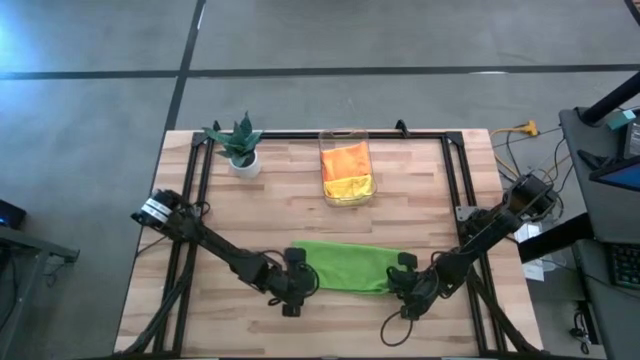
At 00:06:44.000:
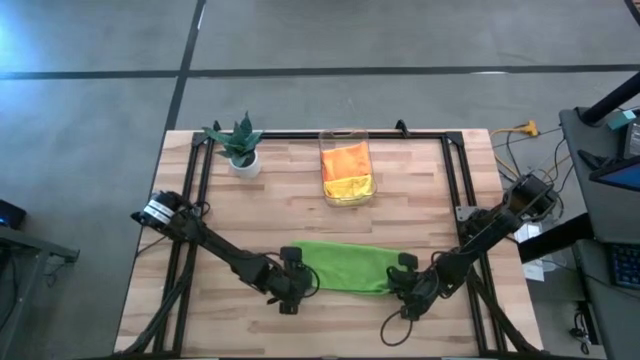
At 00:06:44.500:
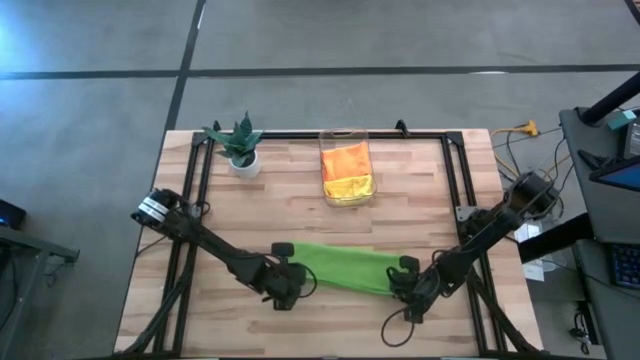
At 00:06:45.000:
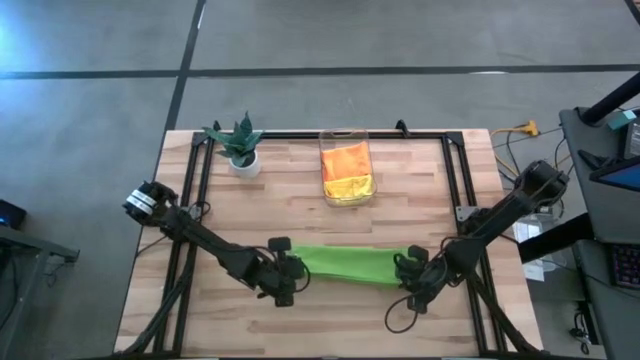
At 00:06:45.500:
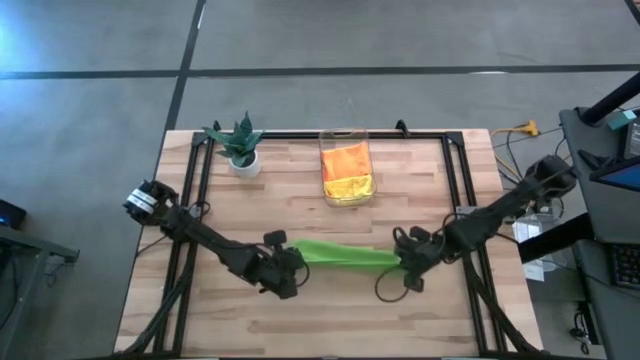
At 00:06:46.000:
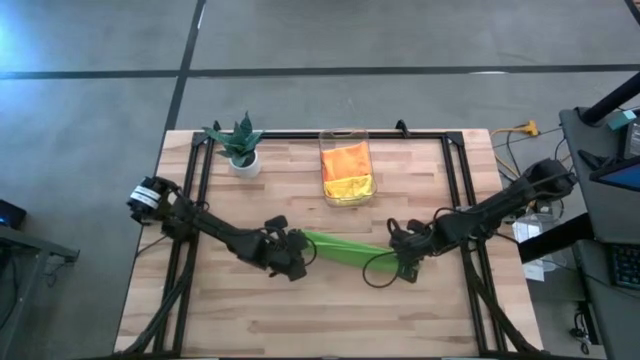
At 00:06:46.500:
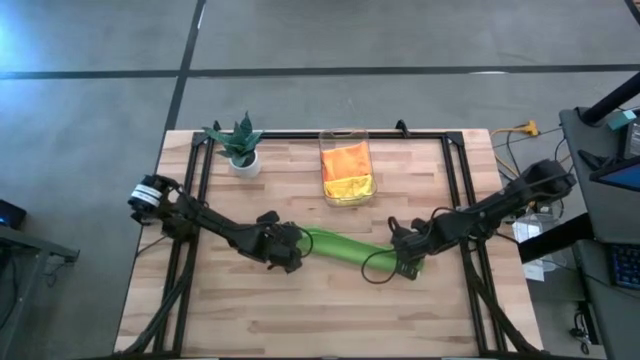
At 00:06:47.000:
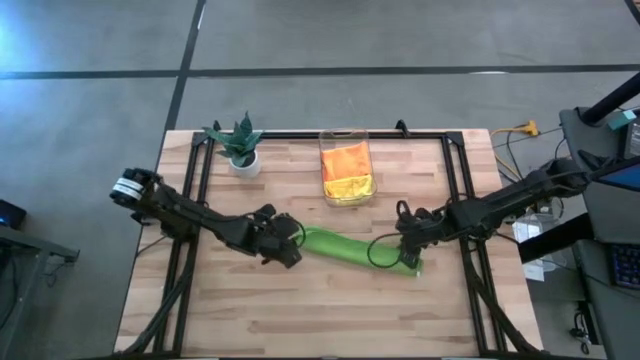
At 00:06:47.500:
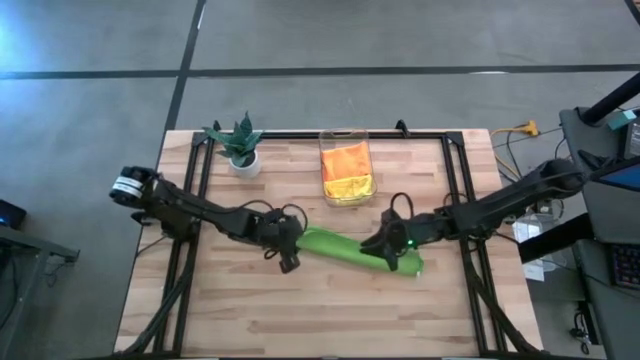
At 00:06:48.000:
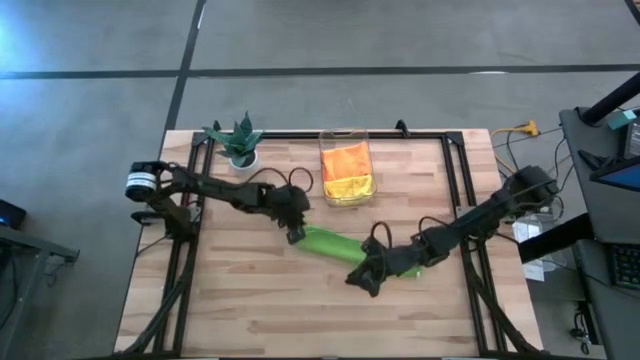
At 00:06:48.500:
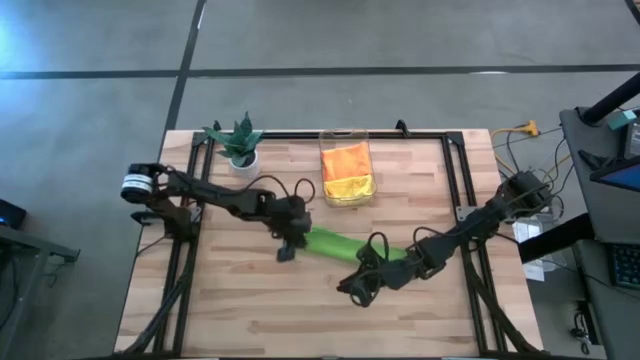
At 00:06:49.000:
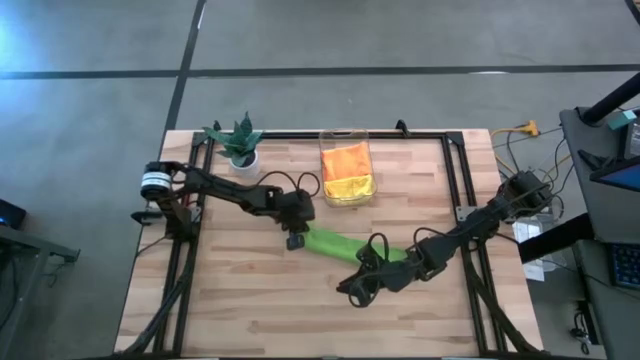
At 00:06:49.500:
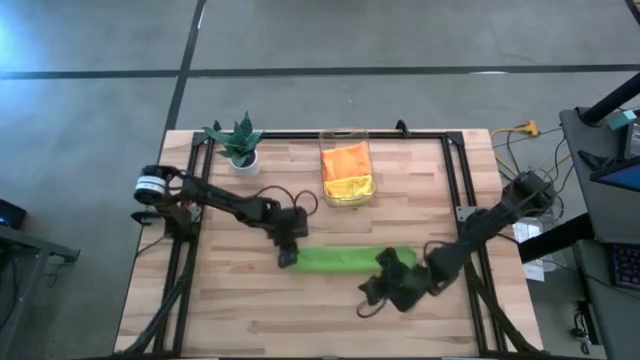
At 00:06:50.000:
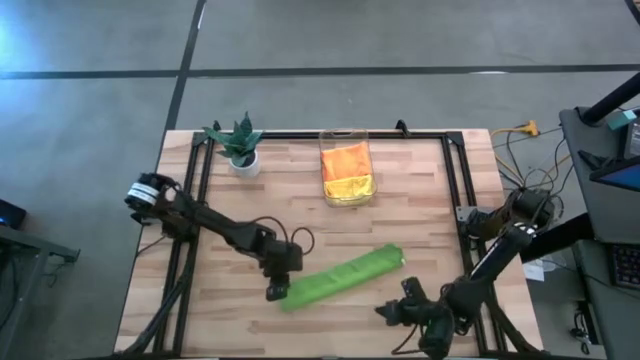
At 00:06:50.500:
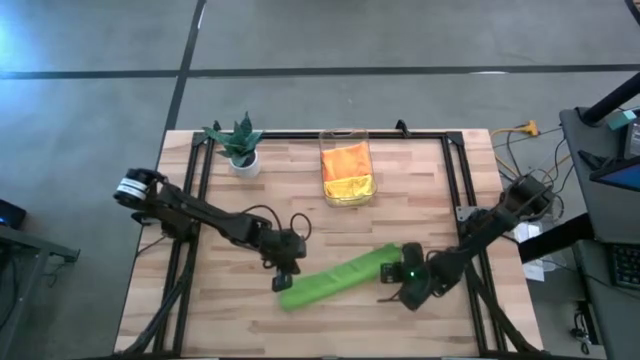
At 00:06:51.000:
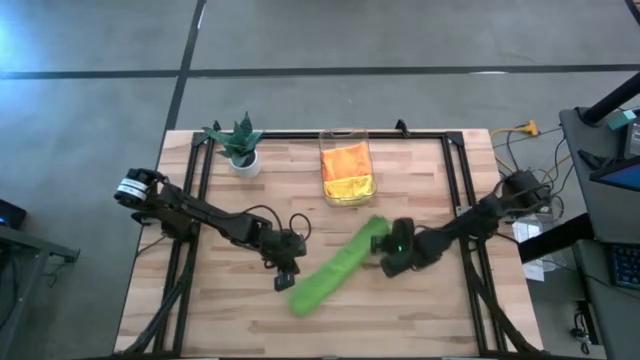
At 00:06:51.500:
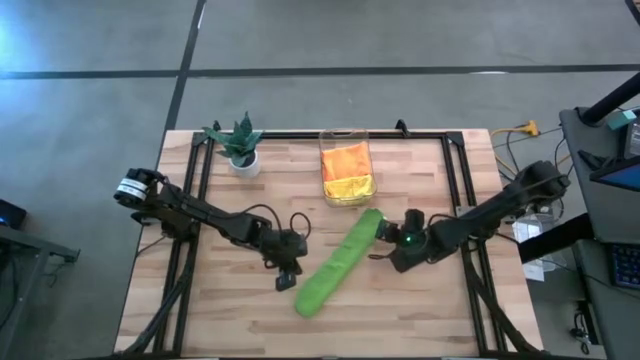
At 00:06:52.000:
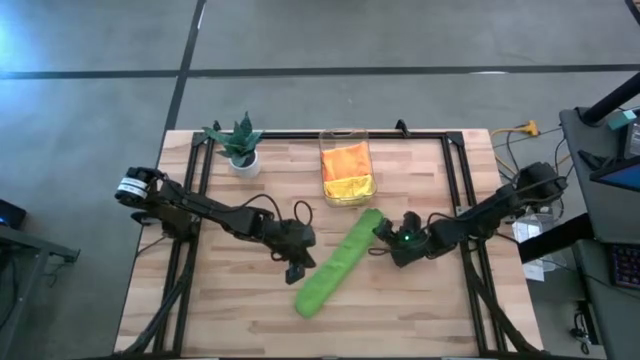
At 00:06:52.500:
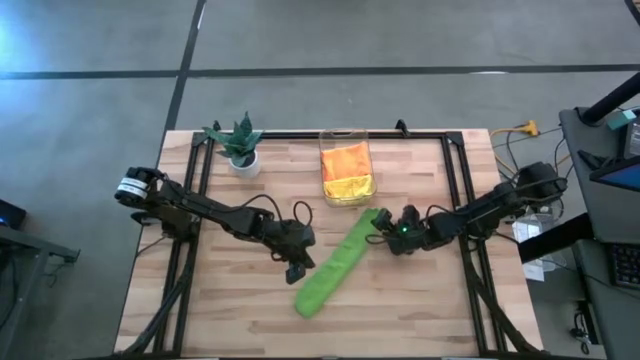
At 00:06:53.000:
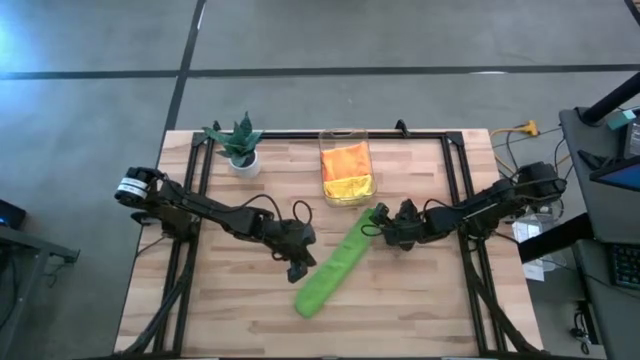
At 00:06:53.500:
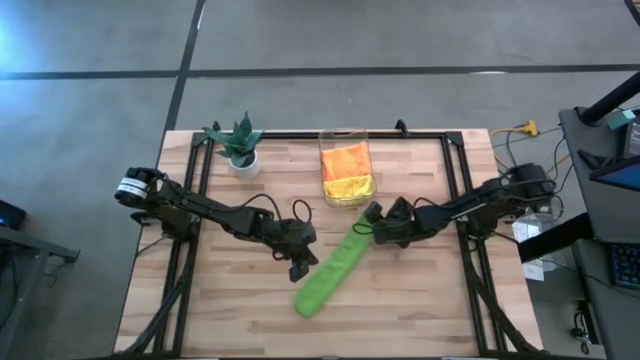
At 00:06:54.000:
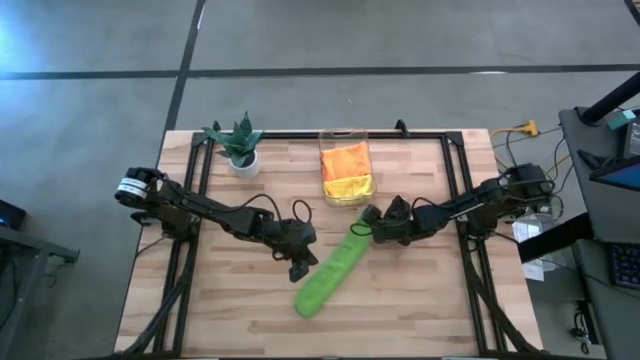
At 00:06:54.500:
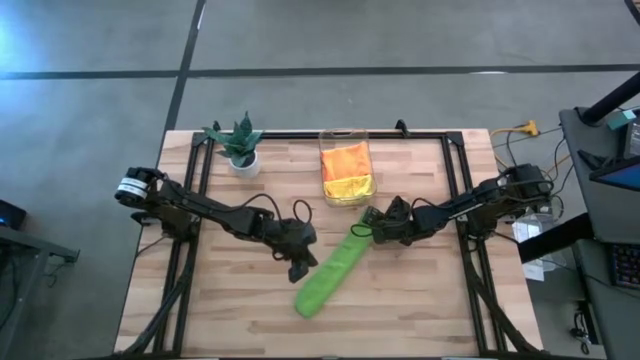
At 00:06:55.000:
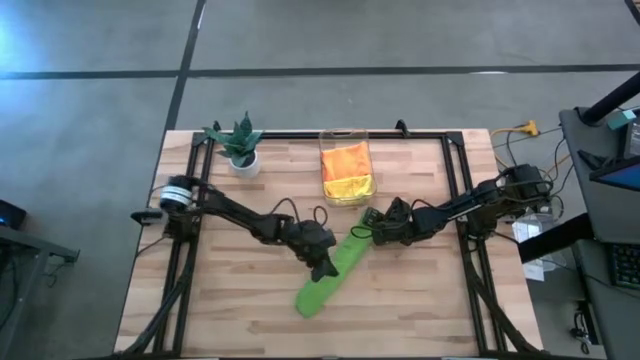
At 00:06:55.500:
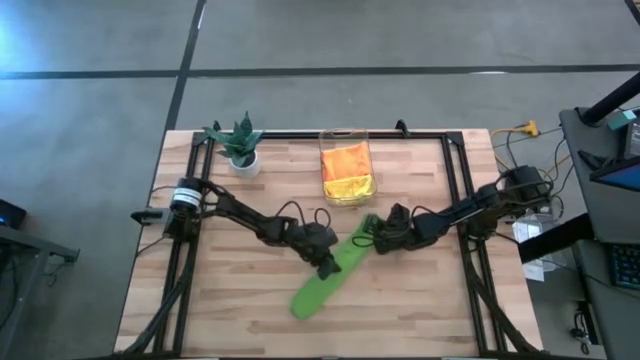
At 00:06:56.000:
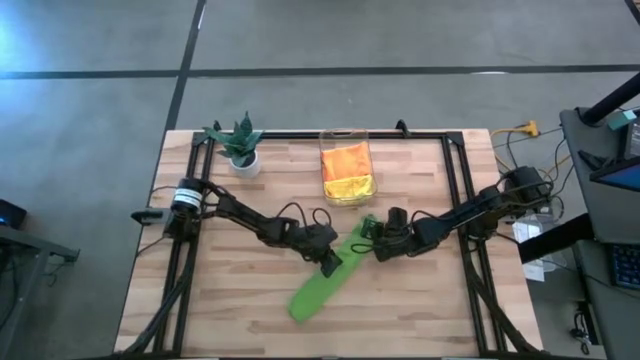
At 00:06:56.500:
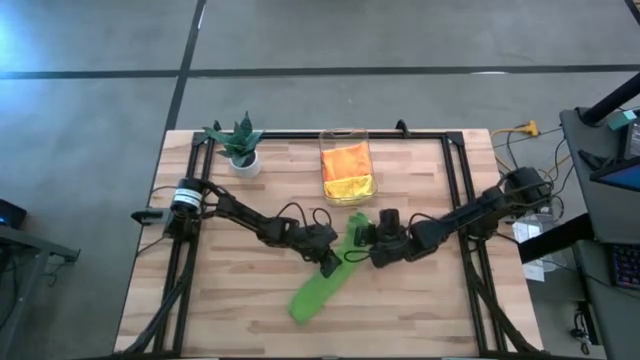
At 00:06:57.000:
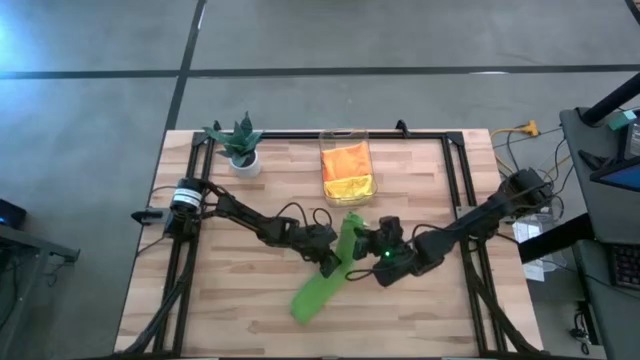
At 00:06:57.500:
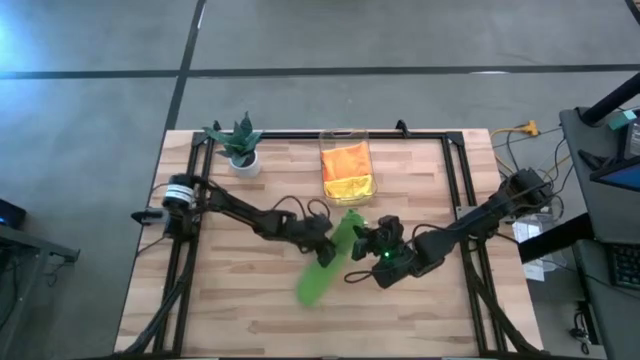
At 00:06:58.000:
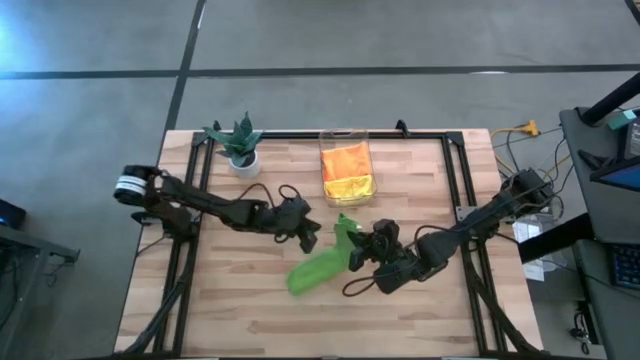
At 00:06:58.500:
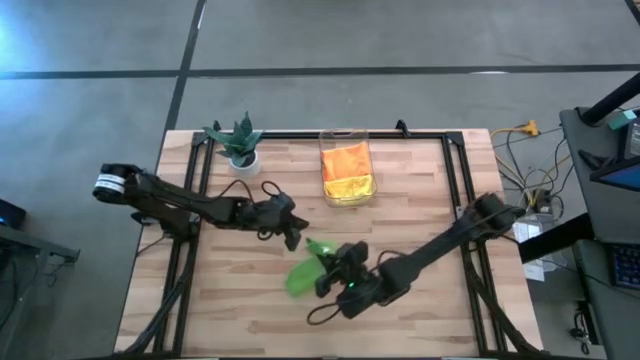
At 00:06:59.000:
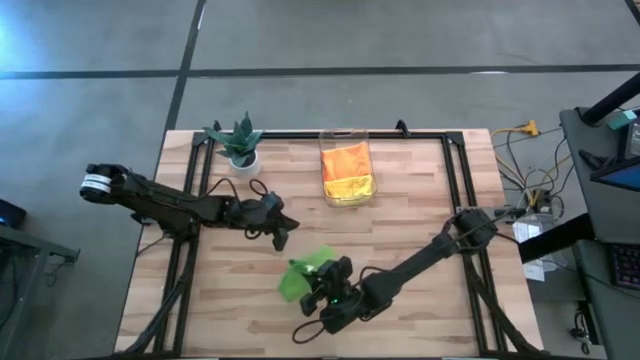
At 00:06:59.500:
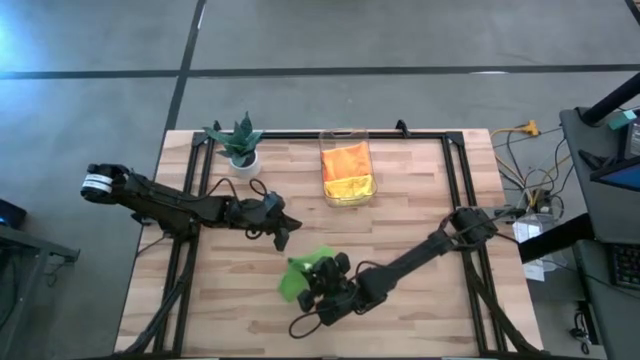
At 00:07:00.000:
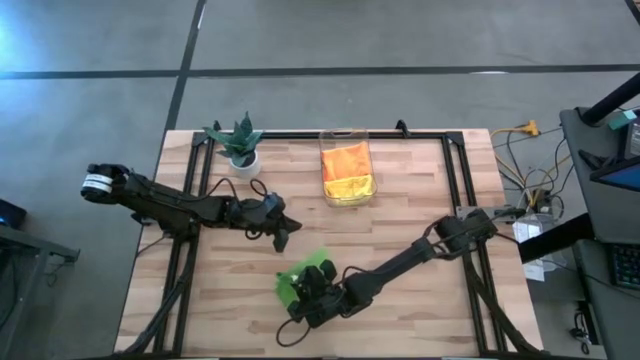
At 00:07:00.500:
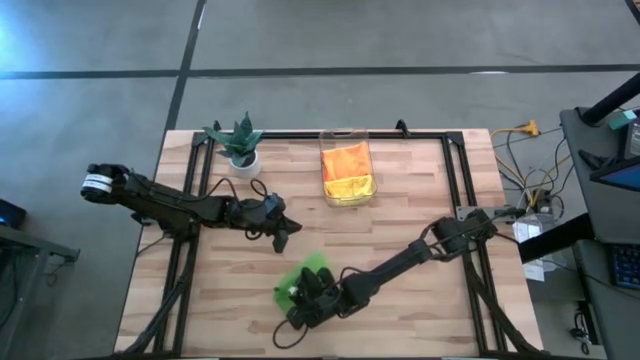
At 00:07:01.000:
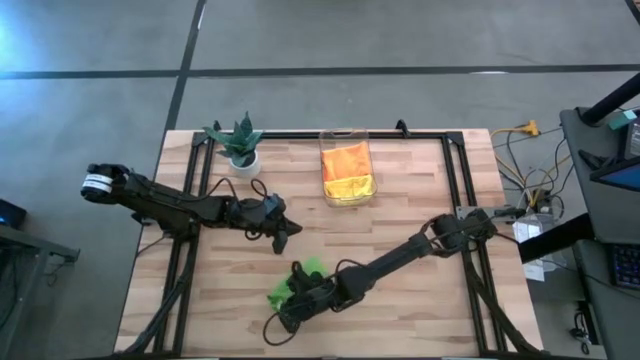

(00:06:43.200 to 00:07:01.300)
Task: Fold microfiber towels
Fold the green towel

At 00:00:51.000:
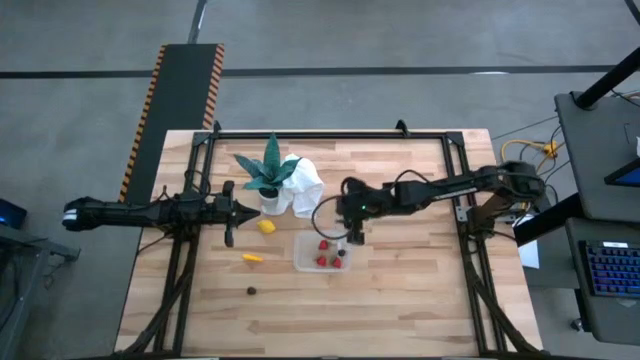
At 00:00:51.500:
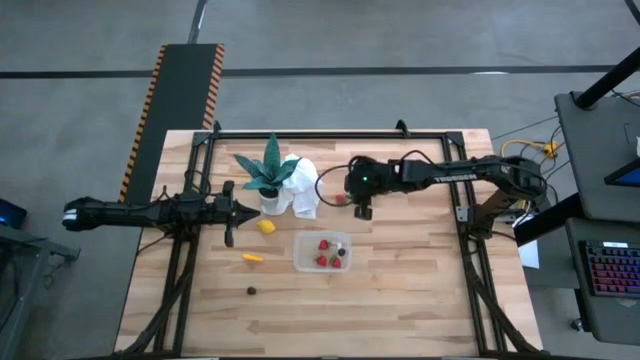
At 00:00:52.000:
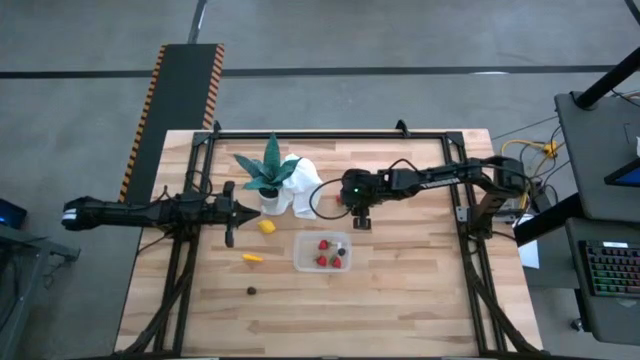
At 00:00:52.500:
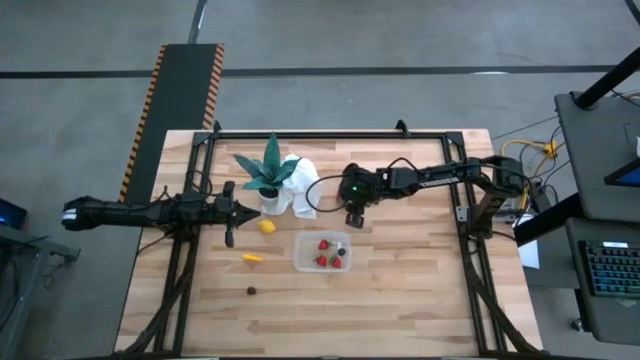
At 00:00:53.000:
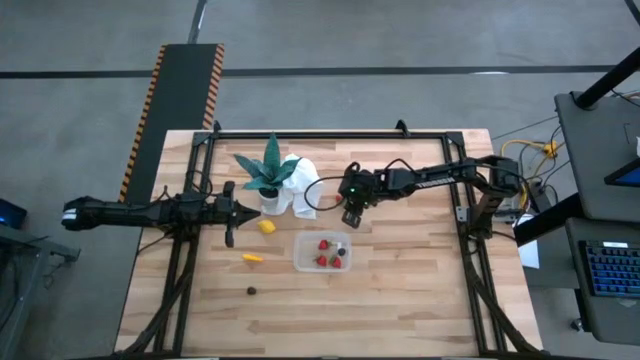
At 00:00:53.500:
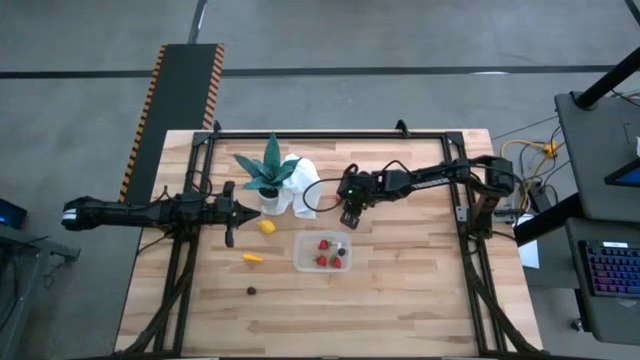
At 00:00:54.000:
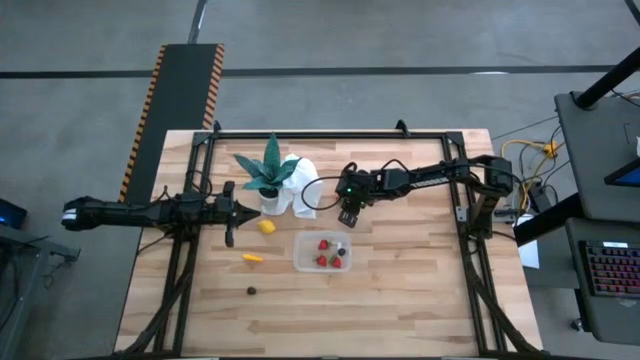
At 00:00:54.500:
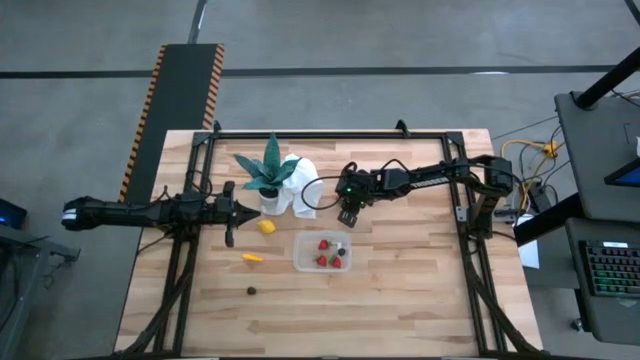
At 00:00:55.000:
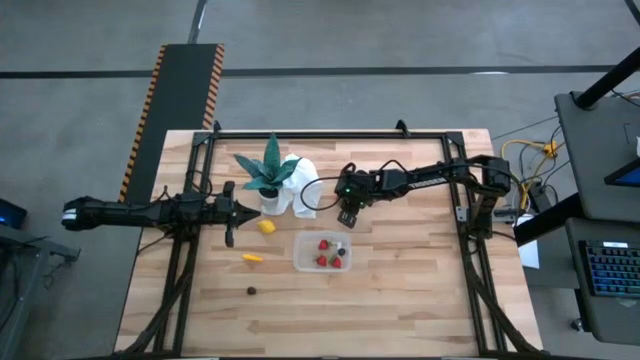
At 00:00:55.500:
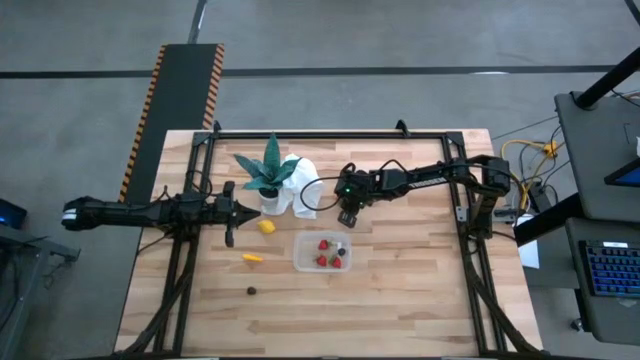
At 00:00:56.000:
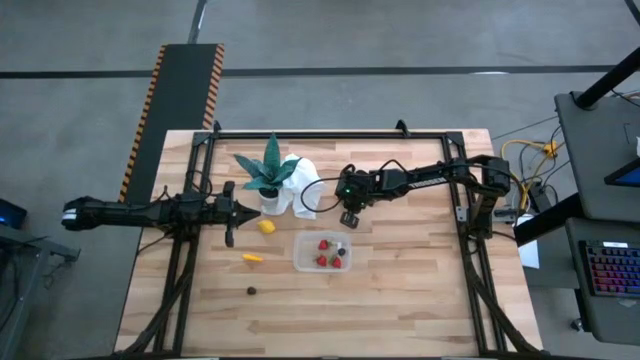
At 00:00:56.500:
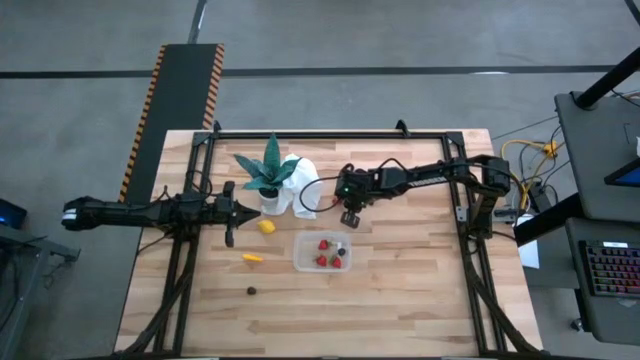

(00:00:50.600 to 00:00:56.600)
Task: Pick and placing Produce into tupperware
Put the strawberry into the bin
